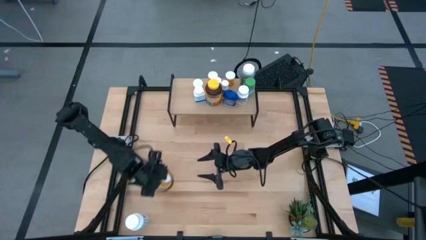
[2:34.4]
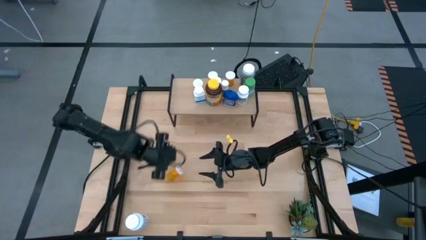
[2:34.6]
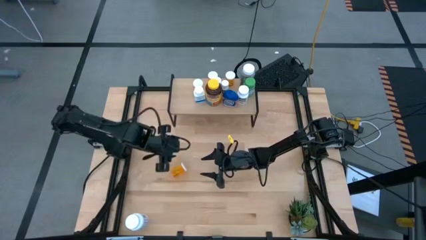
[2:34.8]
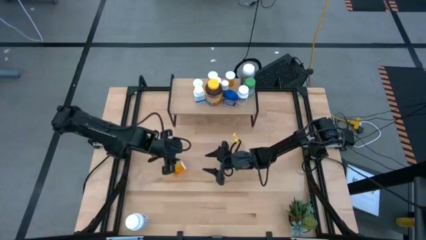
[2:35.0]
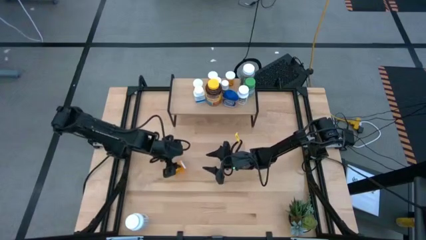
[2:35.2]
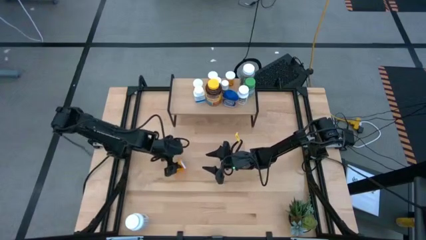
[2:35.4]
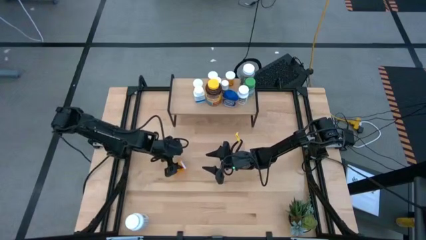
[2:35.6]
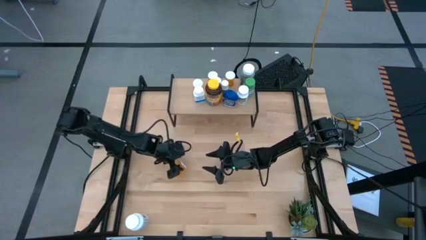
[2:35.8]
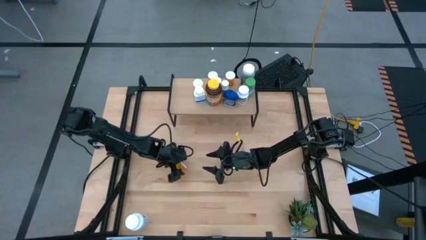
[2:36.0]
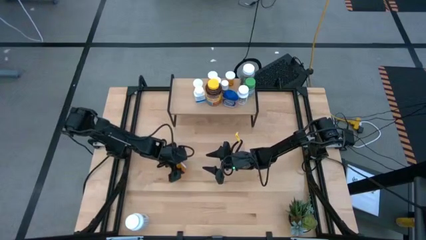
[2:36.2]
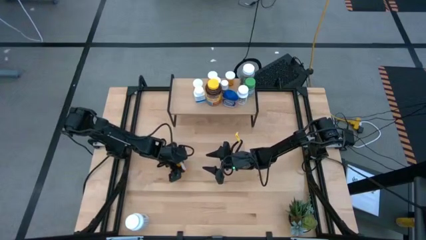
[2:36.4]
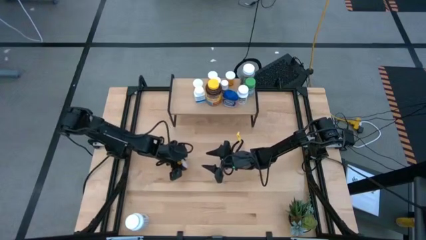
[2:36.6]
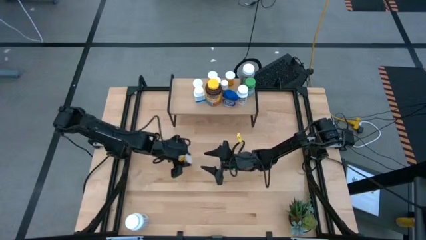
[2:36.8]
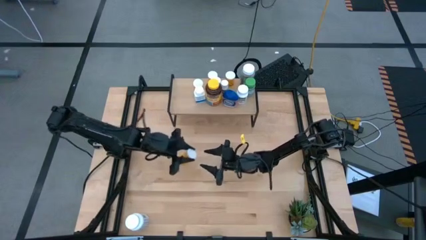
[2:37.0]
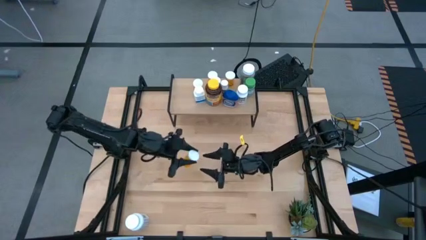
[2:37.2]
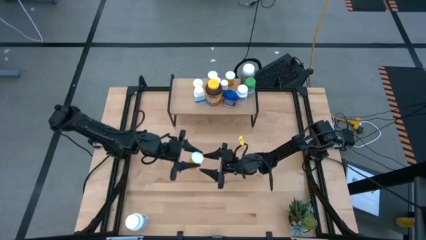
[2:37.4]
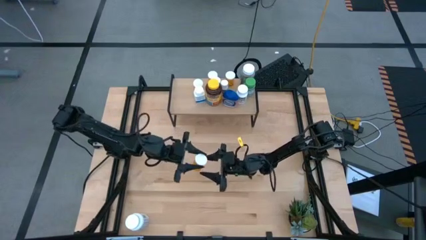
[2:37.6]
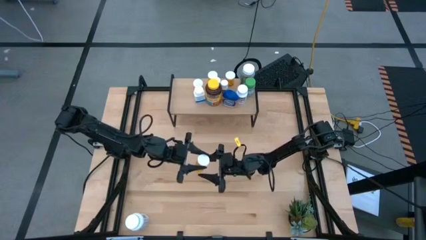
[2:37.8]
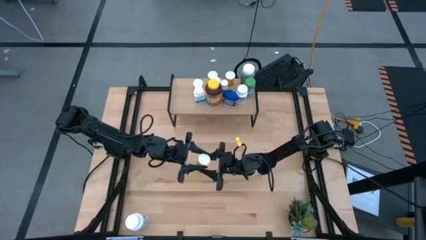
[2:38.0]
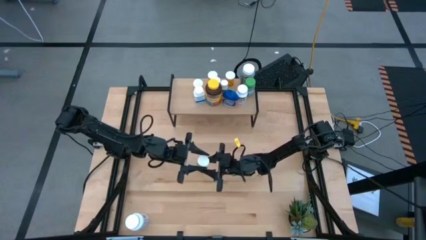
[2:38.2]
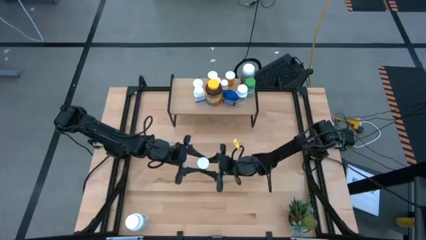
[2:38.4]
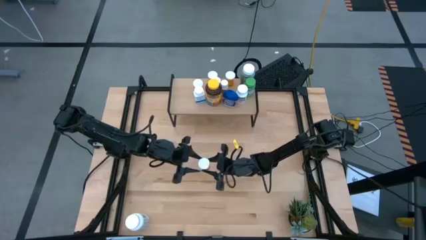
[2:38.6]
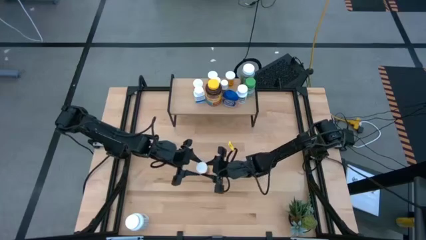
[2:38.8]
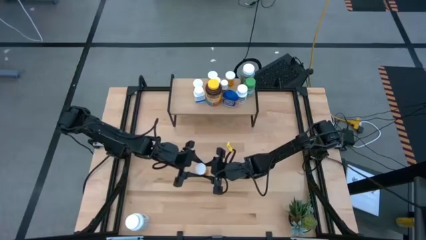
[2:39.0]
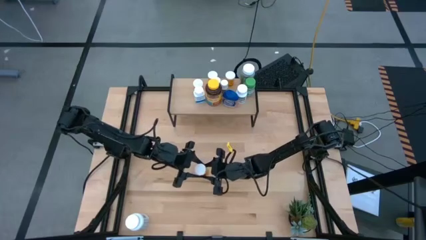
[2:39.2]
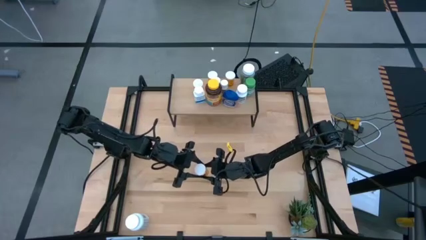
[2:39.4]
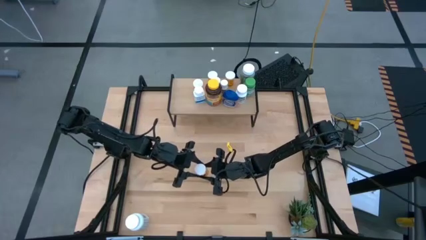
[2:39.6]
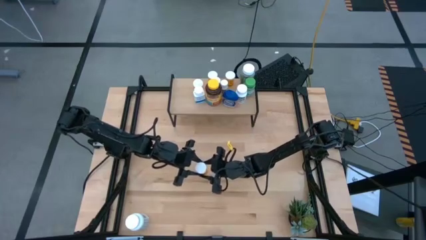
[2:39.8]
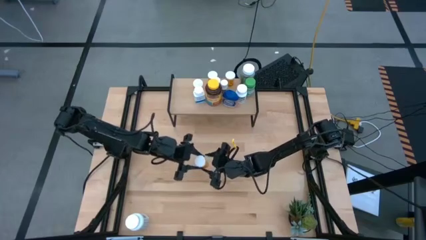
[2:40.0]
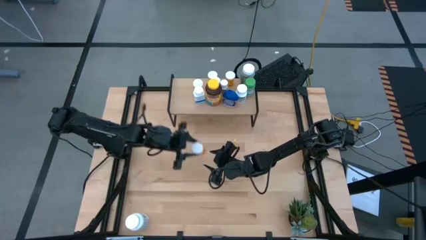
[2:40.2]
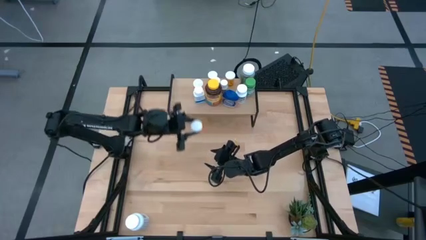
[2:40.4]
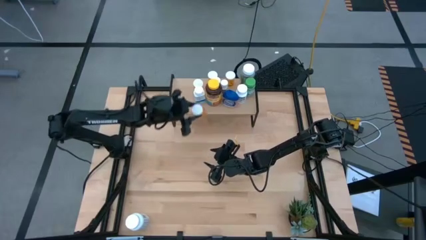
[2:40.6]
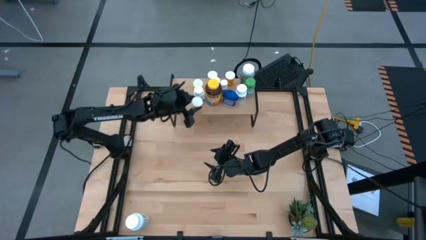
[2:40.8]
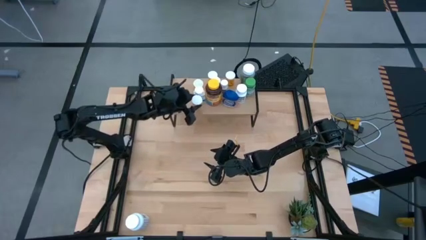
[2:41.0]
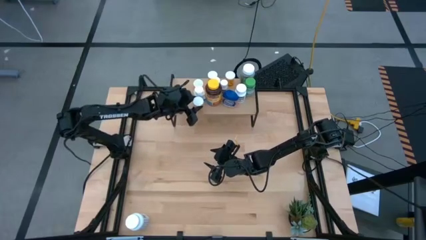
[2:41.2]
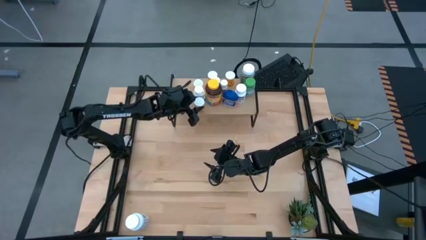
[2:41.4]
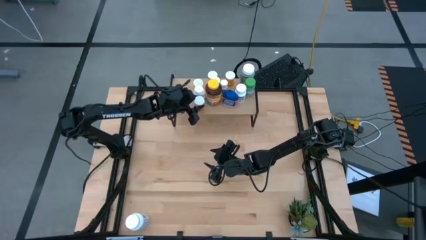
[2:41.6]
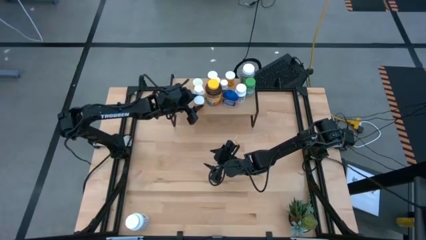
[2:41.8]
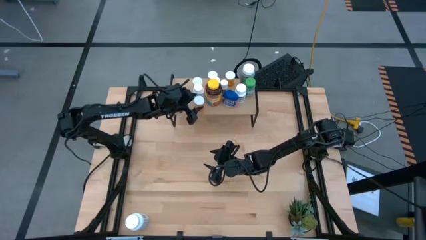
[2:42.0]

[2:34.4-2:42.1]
Task: Pick and place medicine bottles onto shelf by color
Put the orange pill bottle on the shelf

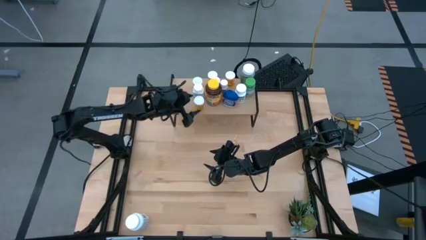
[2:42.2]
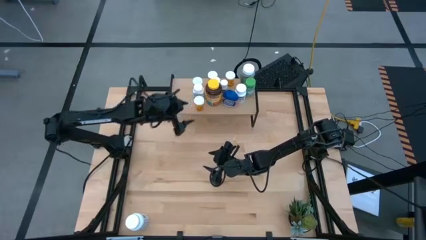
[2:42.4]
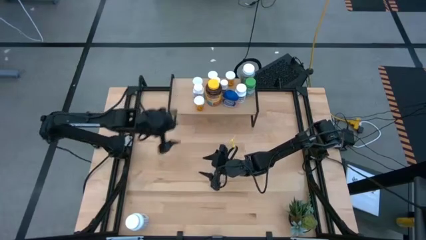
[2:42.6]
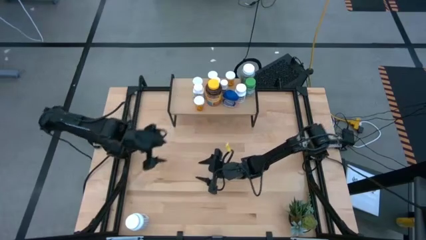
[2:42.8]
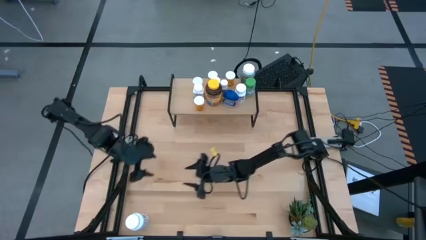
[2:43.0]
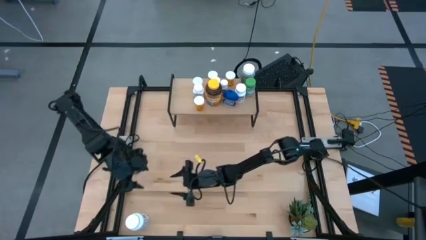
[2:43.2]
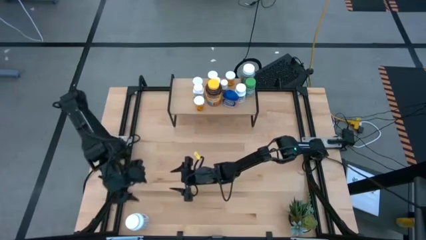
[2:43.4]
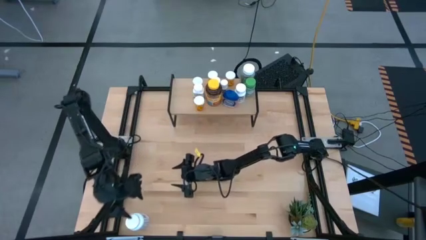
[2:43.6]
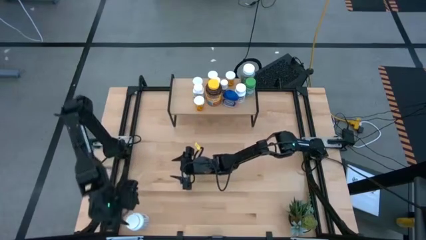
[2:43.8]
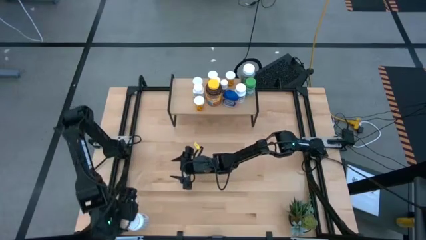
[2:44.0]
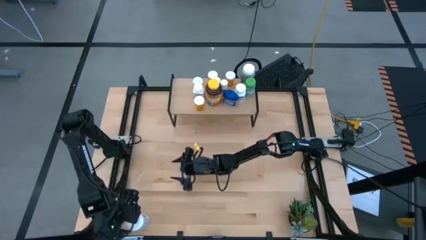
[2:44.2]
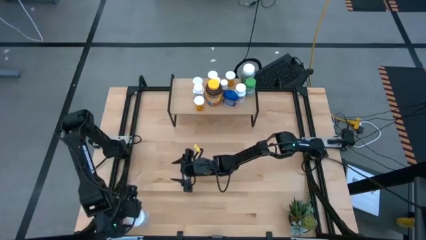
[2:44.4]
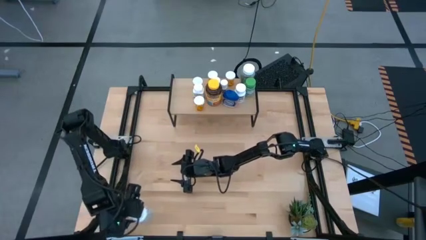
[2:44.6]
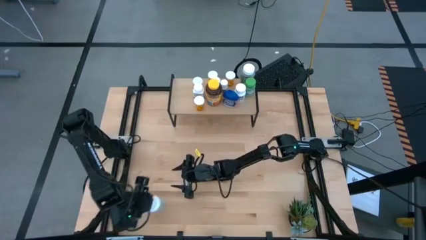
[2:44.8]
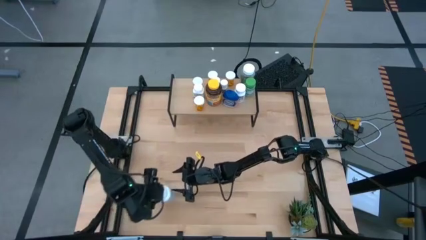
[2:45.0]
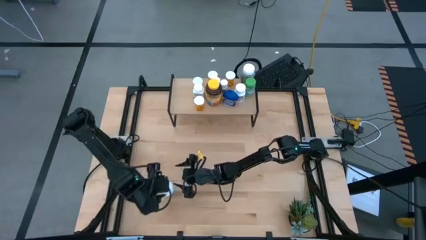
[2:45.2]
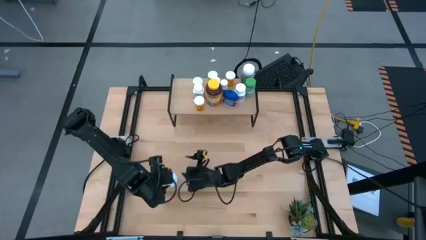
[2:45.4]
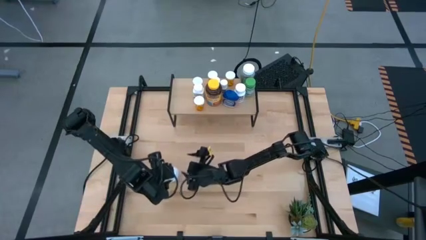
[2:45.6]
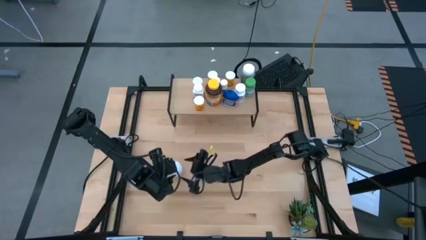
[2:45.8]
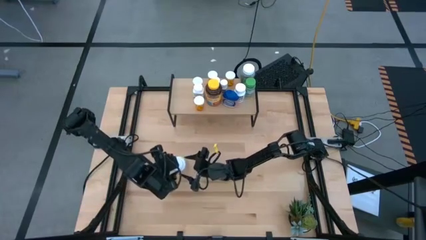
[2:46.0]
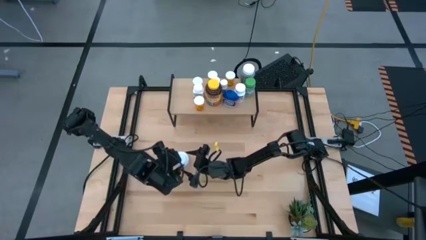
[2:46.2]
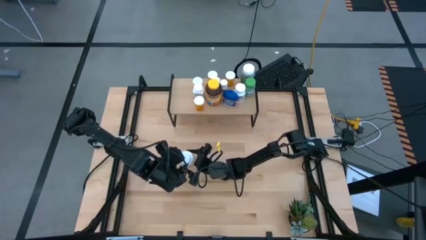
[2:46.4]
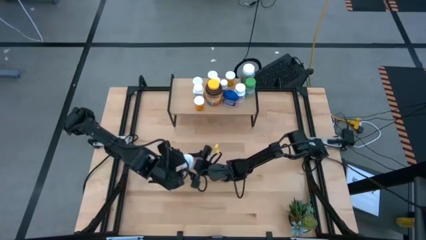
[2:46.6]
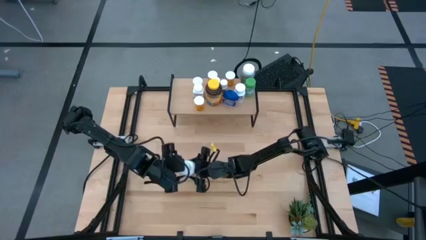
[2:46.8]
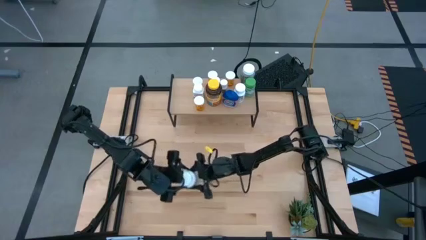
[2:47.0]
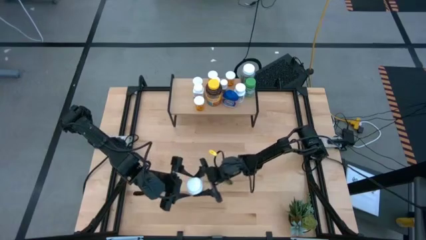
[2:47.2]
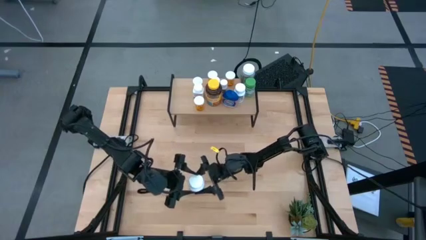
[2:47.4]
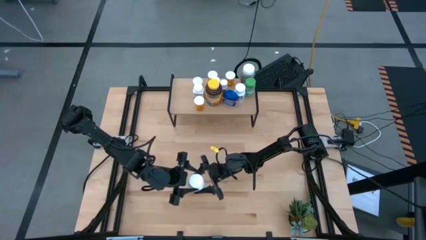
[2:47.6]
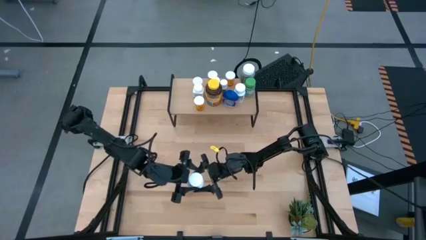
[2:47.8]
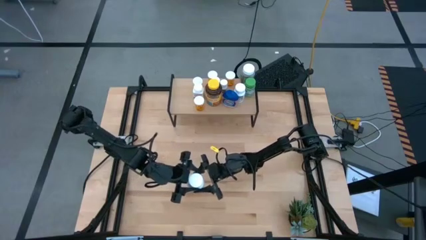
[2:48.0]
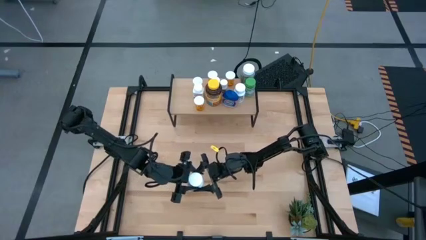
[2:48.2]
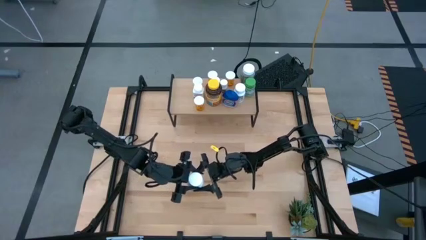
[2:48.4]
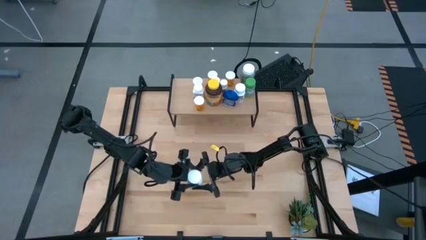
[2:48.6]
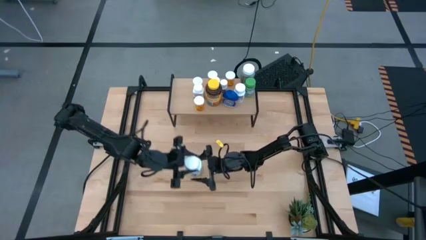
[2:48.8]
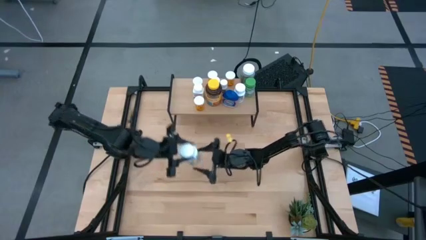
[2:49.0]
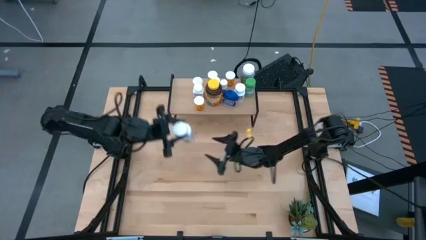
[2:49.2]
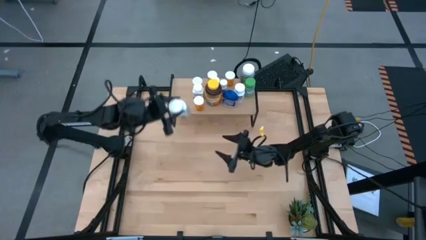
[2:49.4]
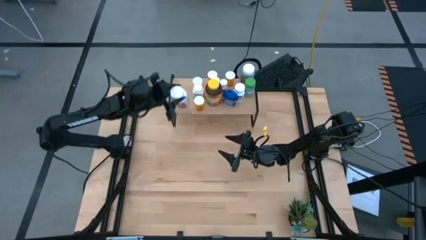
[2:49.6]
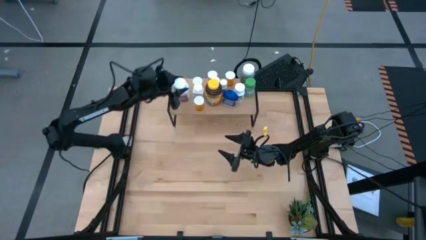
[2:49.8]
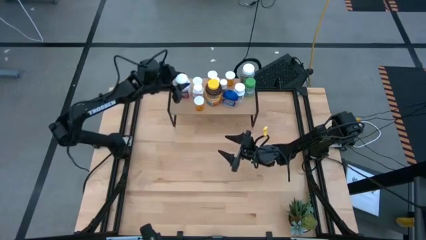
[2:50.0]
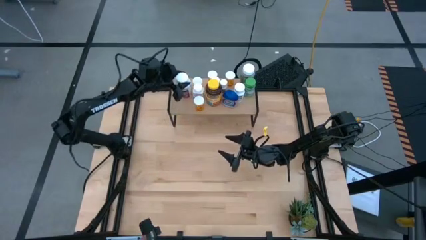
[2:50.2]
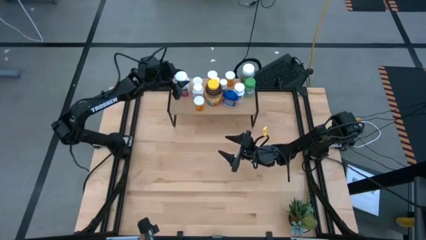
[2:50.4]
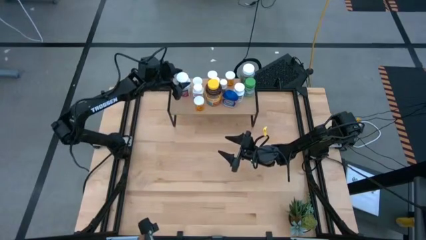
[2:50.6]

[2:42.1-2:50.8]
Put the white and red pill bottle on the shelf
